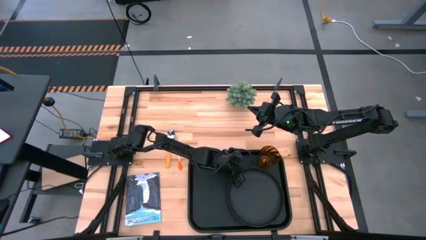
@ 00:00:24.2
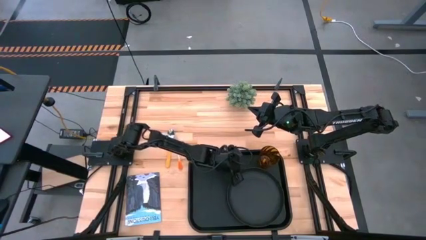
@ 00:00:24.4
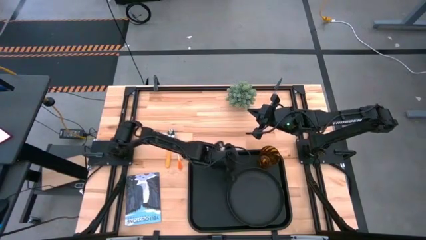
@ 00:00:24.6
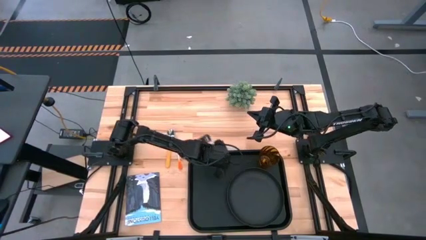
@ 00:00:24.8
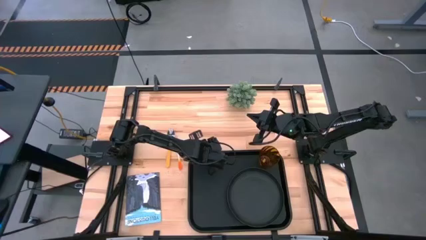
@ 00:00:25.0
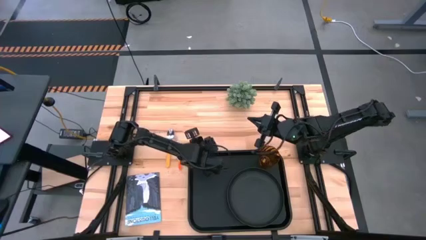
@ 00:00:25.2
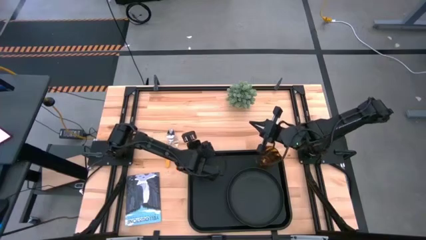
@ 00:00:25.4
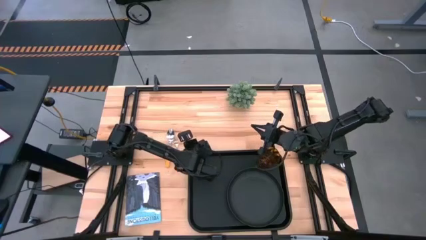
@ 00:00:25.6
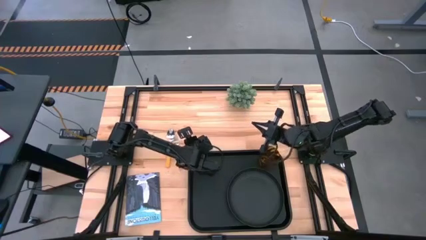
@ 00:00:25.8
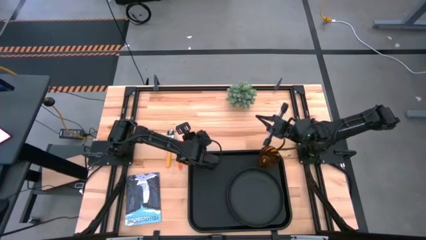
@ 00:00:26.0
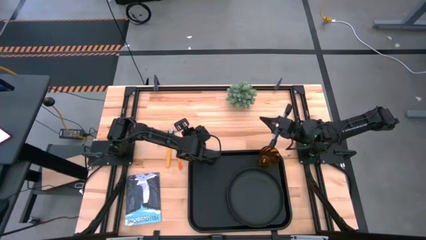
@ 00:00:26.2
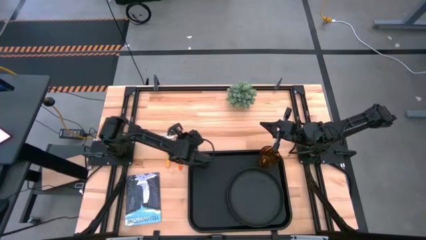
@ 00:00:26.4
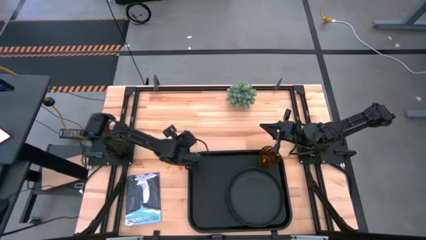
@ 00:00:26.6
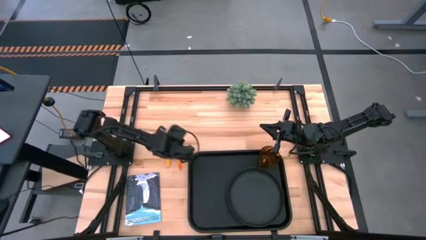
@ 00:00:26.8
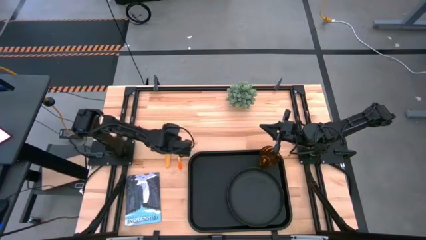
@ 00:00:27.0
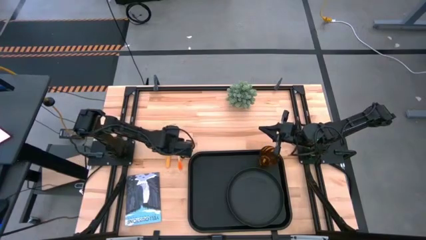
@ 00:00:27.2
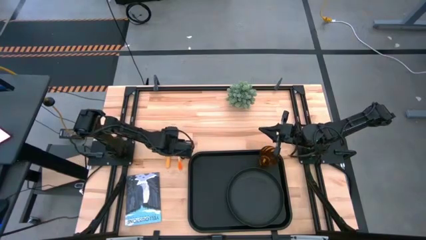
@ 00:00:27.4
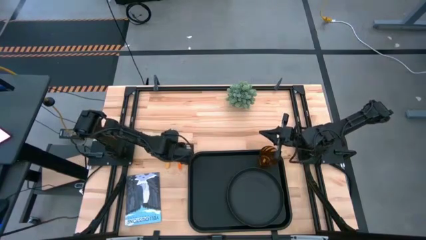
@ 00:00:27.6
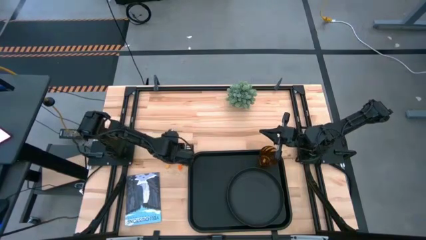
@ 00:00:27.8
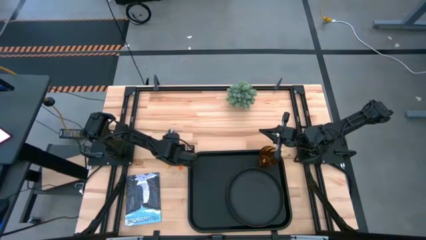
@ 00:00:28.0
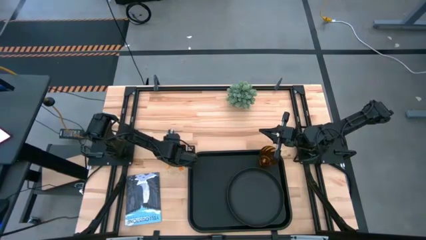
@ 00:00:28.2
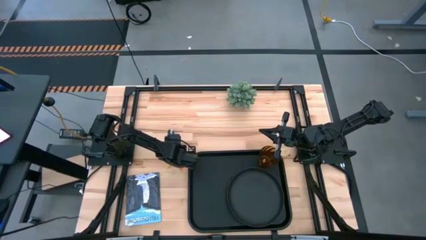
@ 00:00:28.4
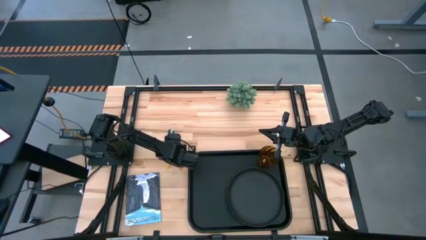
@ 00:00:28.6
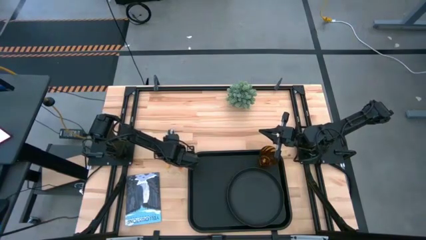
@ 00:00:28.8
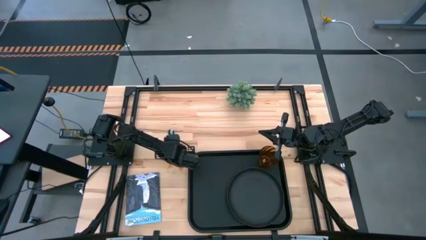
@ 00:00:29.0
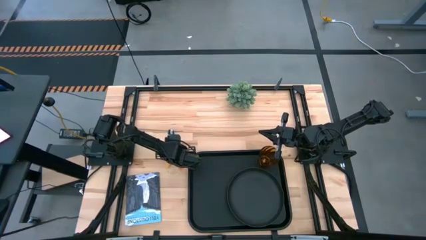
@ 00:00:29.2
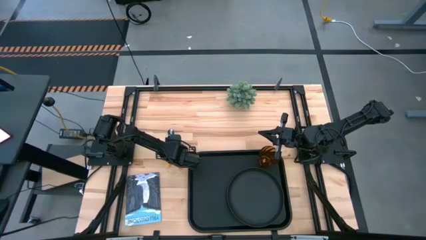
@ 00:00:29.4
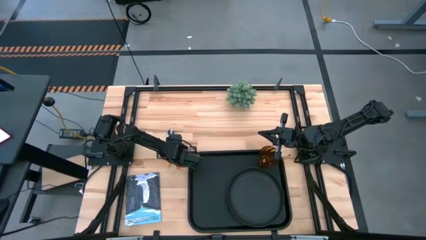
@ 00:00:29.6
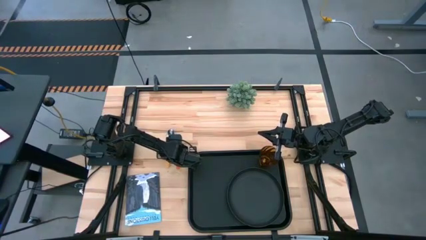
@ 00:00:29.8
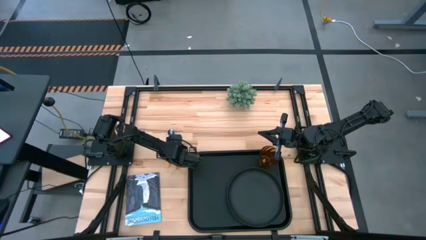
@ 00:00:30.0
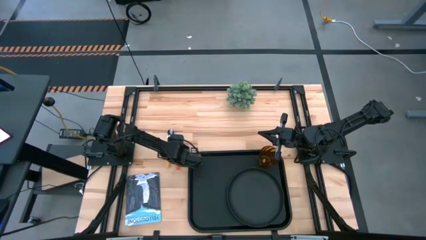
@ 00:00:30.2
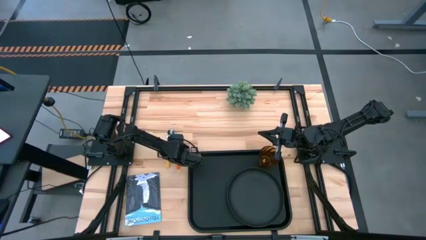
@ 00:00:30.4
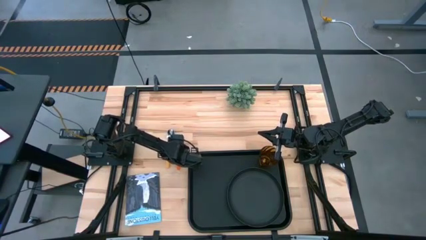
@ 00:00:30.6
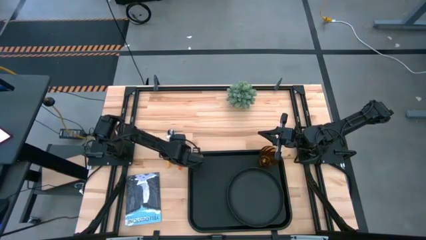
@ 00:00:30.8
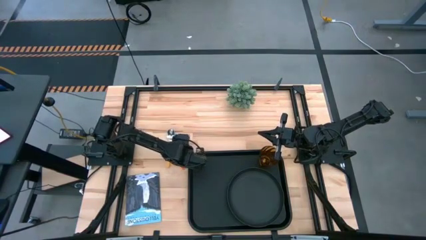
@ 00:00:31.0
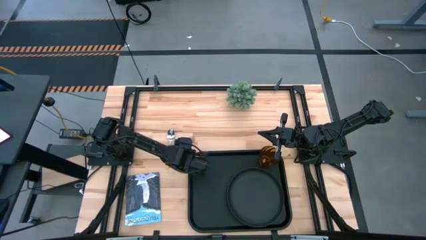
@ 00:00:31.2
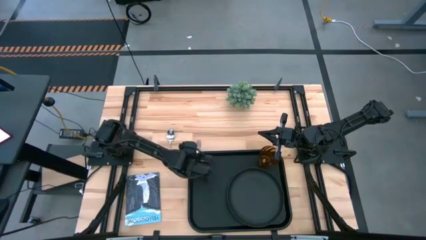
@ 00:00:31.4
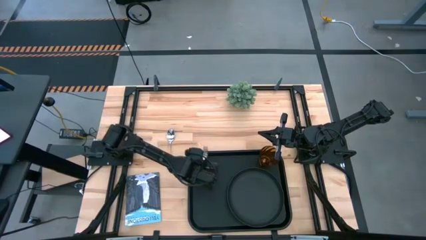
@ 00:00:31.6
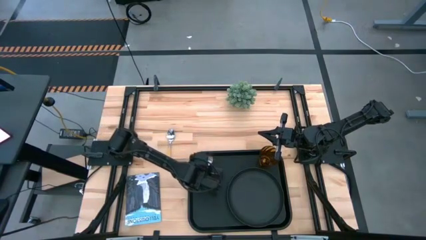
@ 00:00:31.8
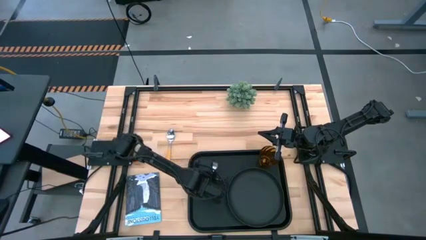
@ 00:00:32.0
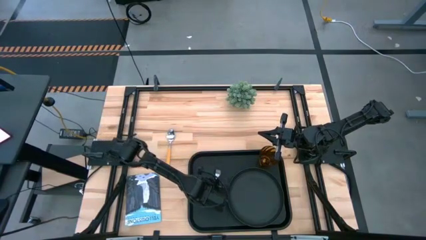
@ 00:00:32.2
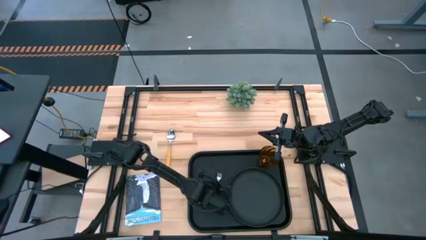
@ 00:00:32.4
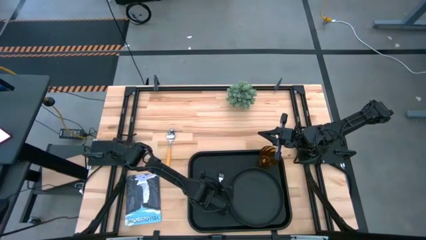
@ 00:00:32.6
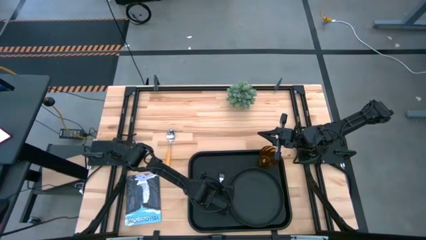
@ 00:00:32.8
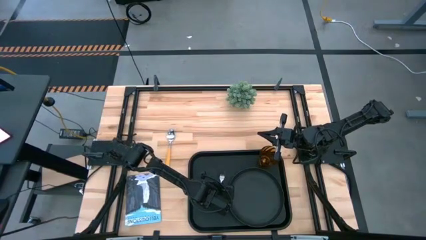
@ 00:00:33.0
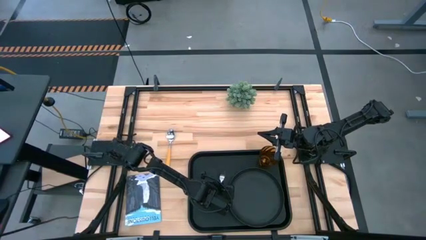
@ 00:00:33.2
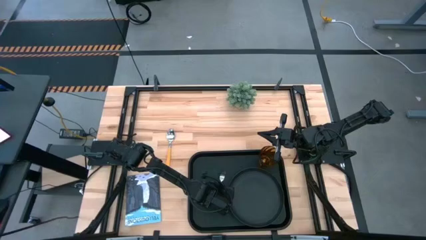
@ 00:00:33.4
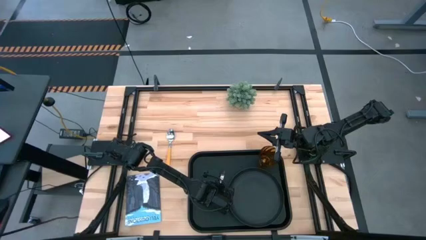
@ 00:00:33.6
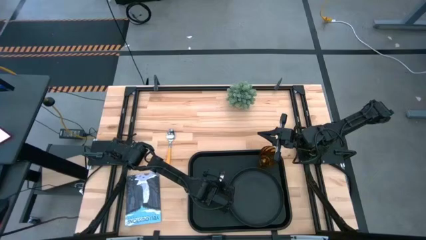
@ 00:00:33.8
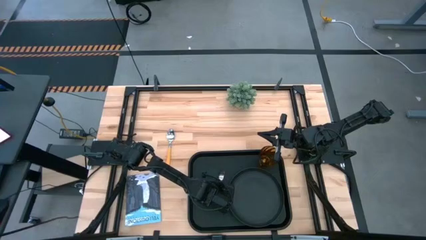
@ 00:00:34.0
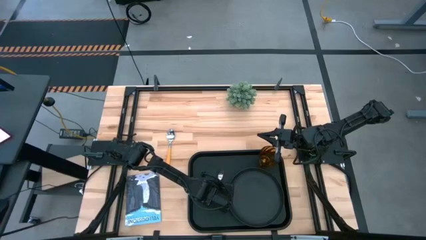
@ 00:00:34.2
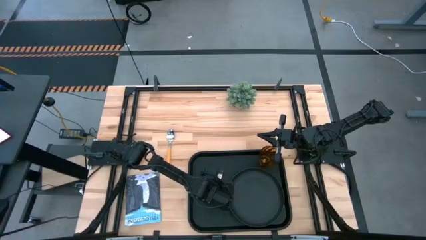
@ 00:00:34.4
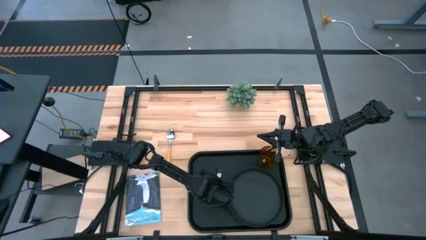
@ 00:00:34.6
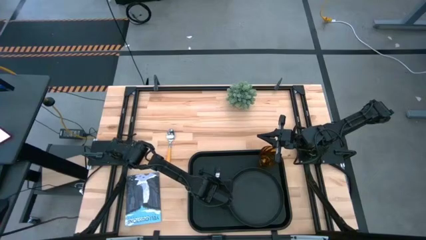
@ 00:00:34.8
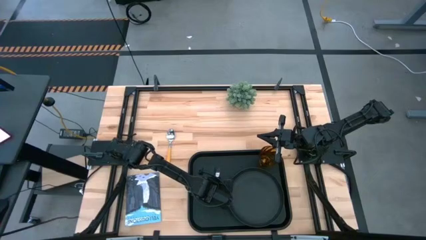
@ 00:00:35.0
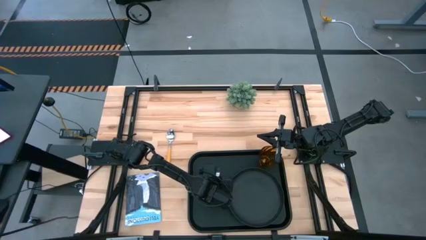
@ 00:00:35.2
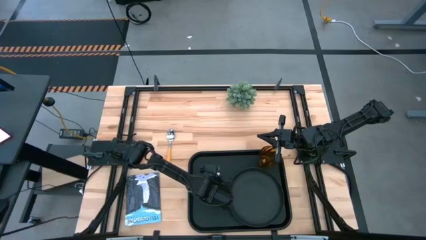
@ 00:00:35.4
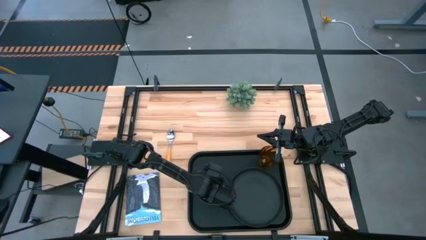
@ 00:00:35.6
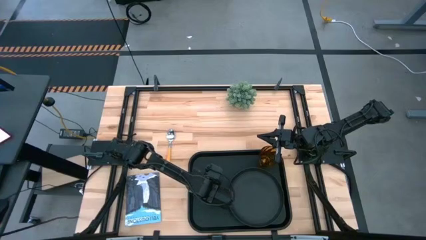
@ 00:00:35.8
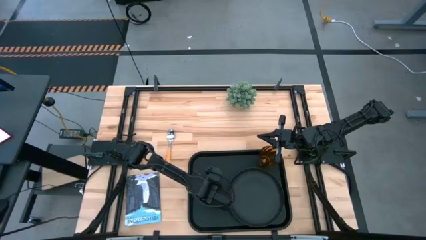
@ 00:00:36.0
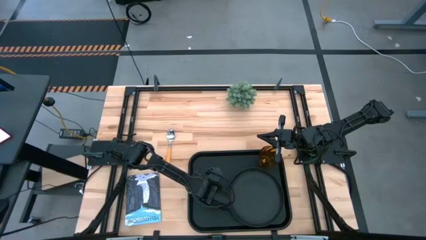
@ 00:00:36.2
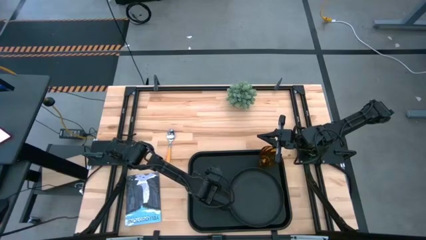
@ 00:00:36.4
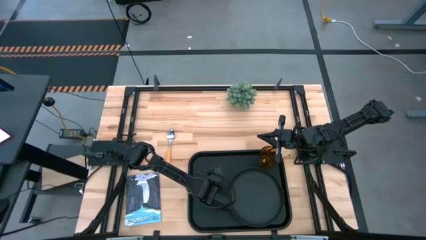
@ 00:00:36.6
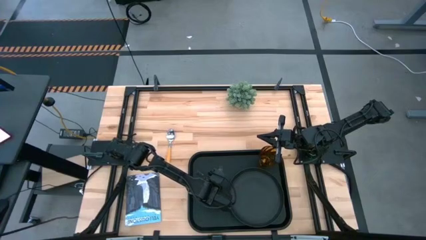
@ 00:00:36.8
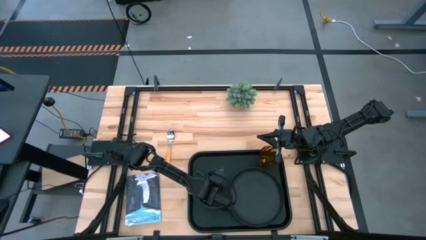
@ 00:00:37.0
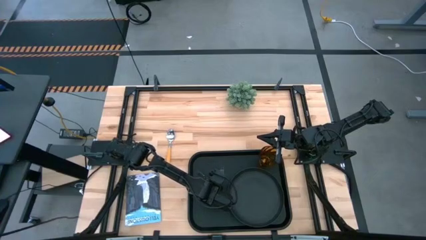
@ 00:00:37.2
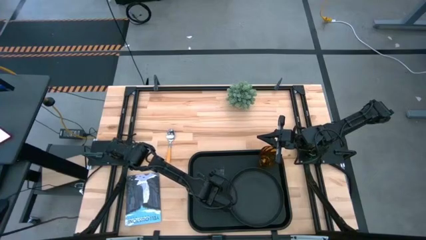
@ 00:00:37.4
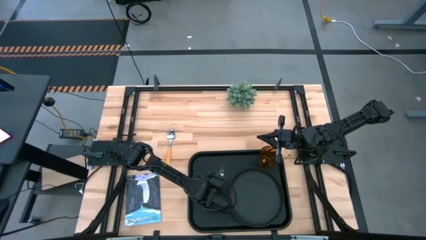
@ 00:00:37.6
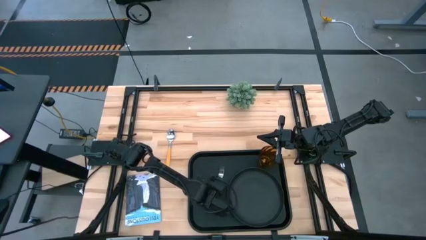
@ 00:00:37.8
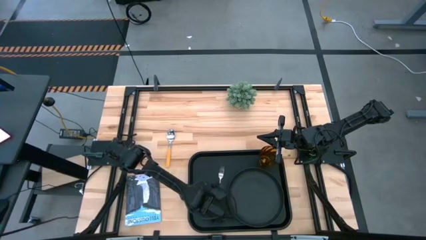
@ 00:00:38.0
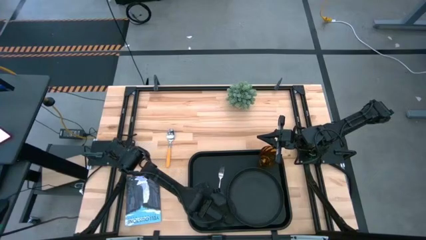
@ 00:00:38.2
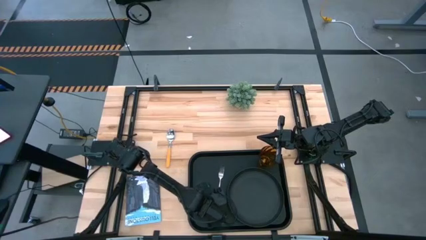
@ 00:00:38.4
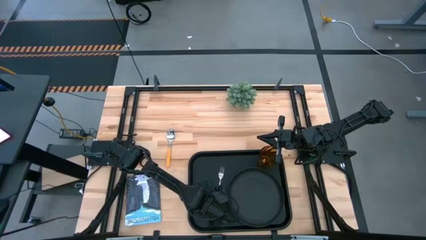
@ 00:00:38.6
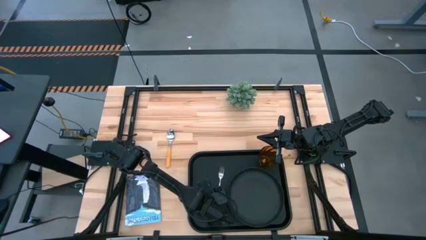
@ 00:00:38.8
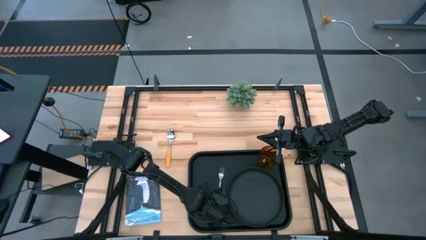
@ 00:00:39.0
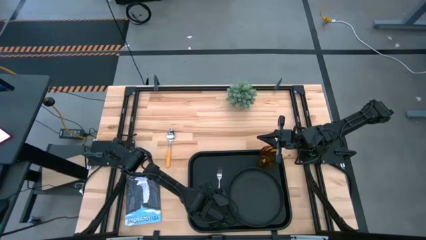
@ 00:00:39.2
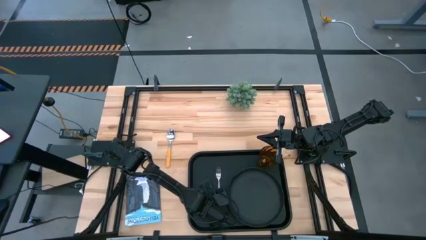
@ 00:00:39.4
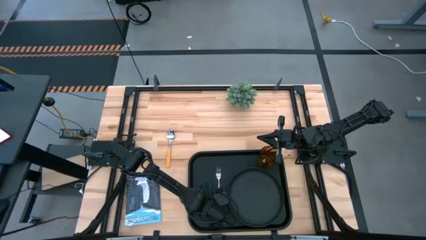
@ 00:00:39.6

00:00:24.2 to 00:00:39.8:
Task: Pick and place plate/cup/fork/spoon on tray
Put the orange fork on the black serving tray at the left of the black plate
